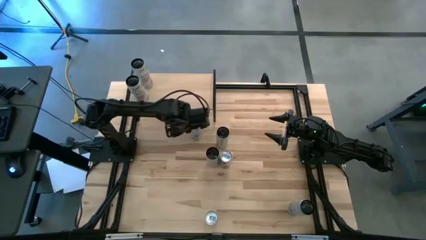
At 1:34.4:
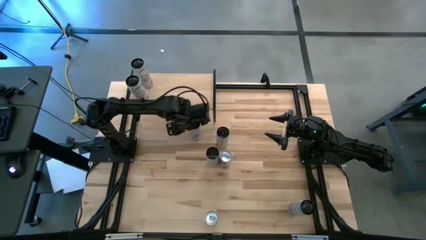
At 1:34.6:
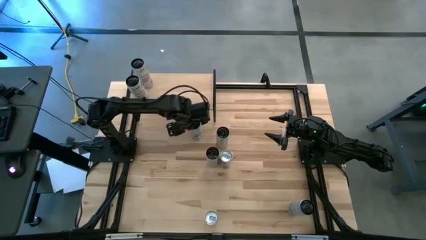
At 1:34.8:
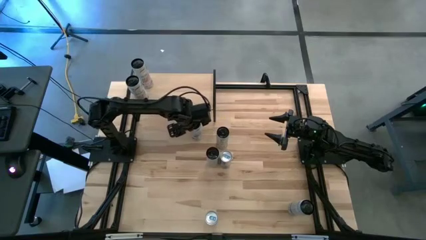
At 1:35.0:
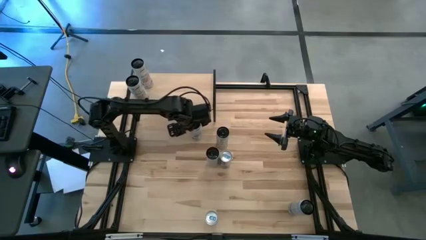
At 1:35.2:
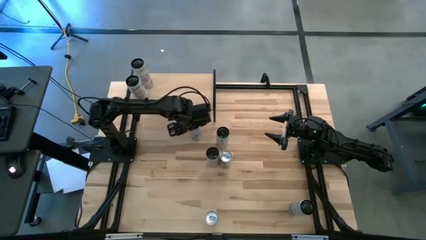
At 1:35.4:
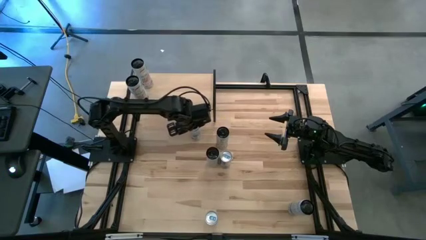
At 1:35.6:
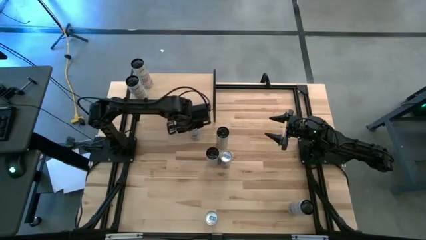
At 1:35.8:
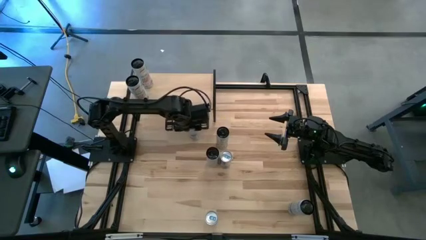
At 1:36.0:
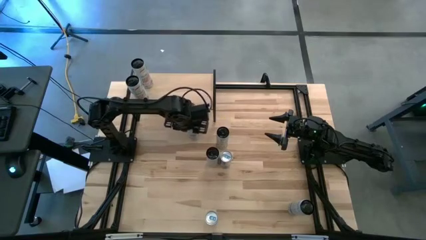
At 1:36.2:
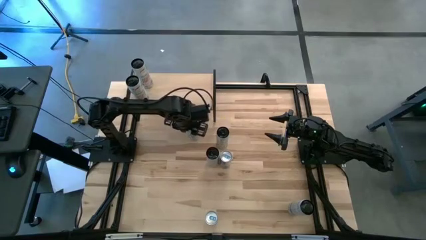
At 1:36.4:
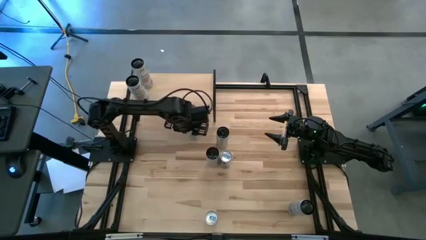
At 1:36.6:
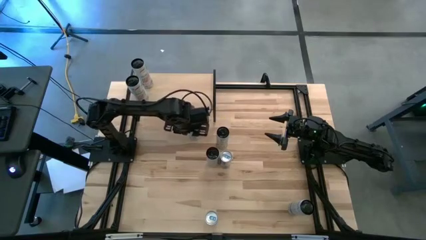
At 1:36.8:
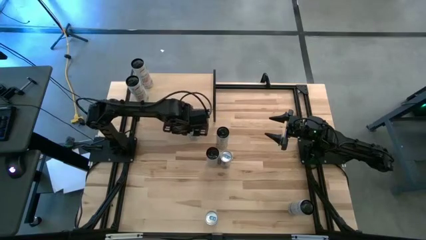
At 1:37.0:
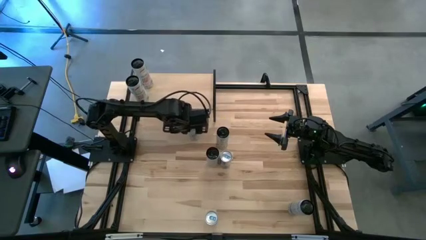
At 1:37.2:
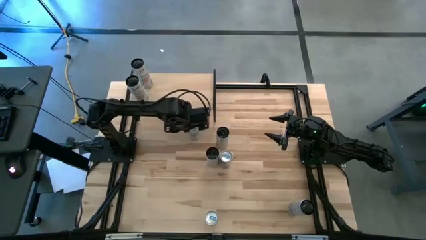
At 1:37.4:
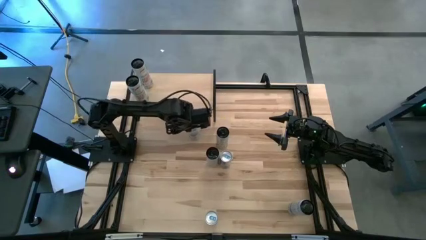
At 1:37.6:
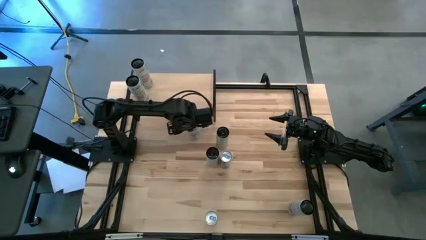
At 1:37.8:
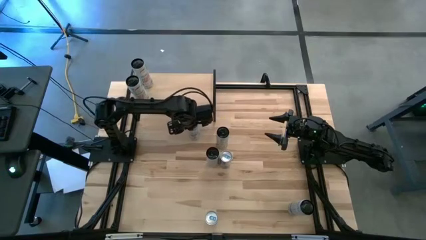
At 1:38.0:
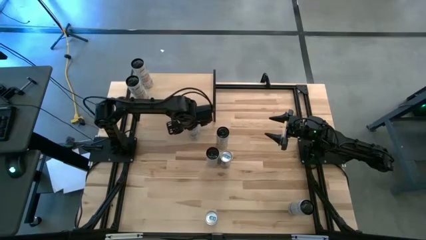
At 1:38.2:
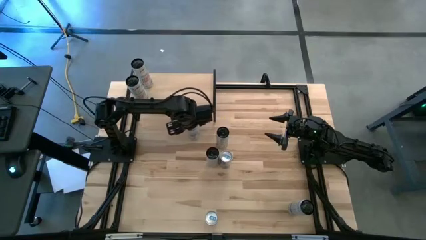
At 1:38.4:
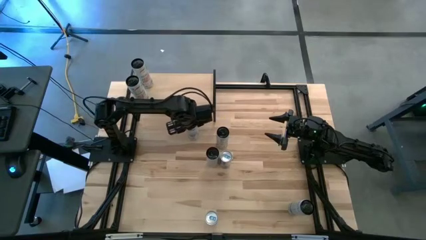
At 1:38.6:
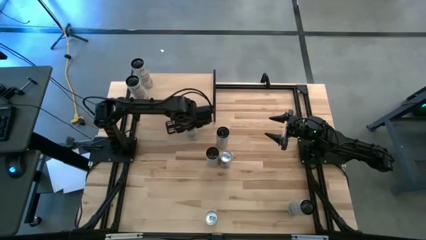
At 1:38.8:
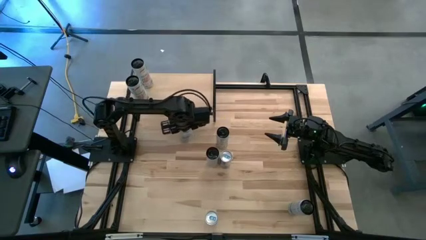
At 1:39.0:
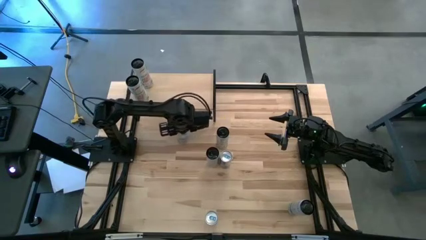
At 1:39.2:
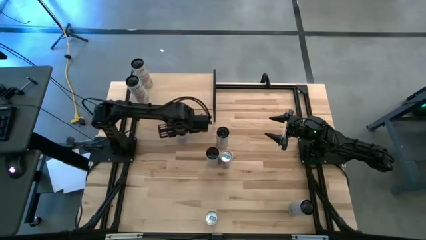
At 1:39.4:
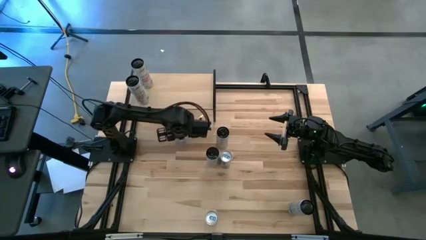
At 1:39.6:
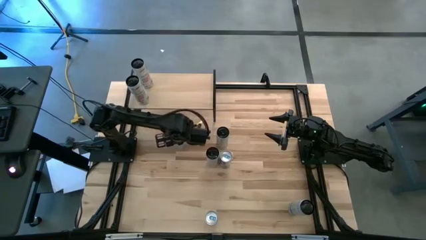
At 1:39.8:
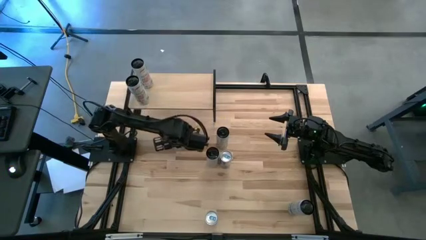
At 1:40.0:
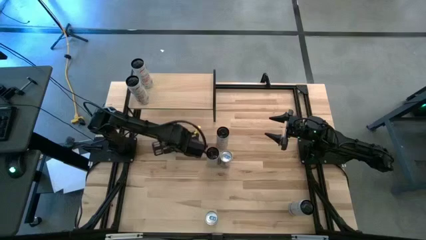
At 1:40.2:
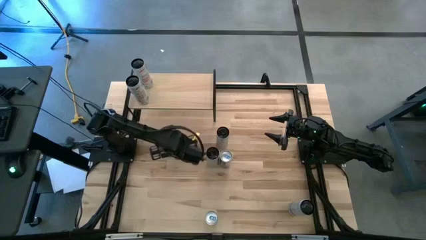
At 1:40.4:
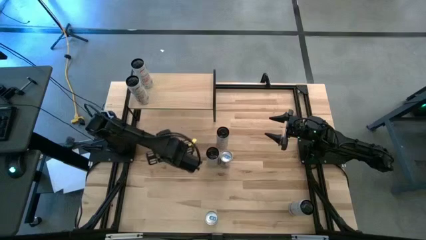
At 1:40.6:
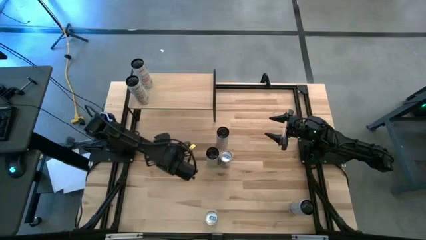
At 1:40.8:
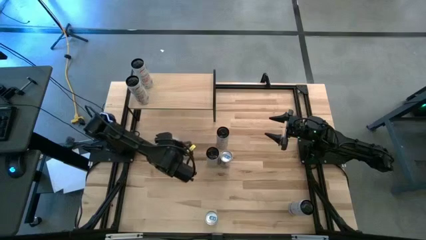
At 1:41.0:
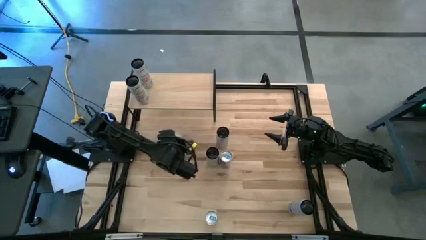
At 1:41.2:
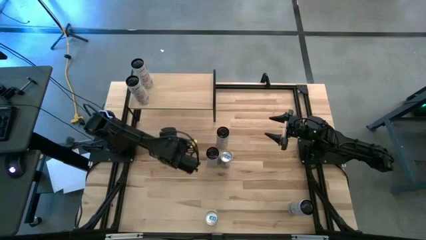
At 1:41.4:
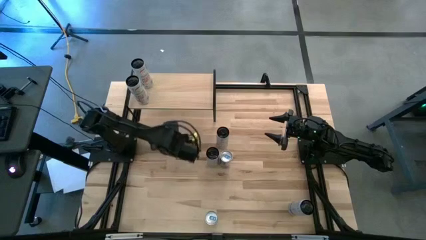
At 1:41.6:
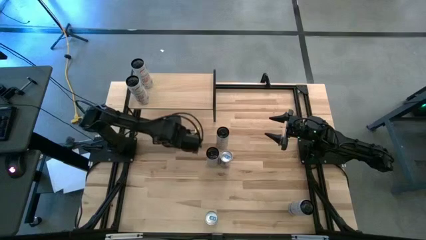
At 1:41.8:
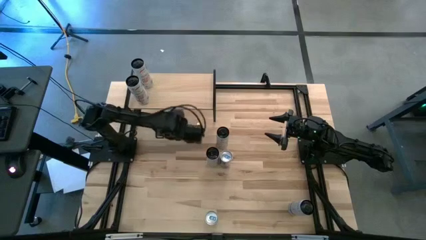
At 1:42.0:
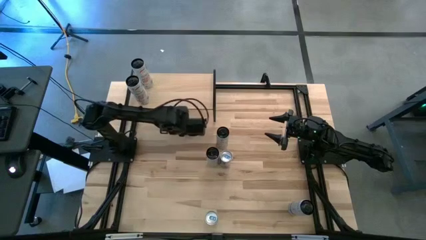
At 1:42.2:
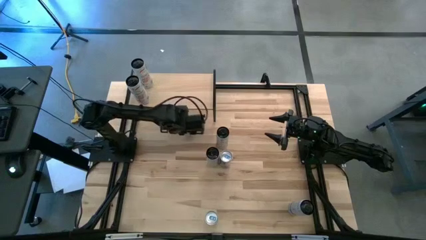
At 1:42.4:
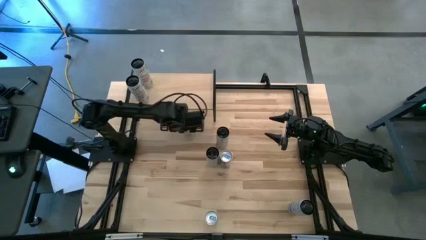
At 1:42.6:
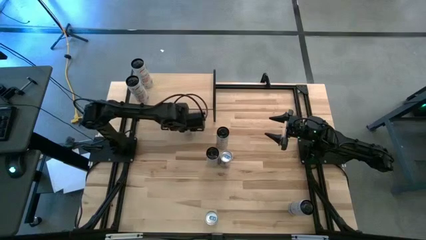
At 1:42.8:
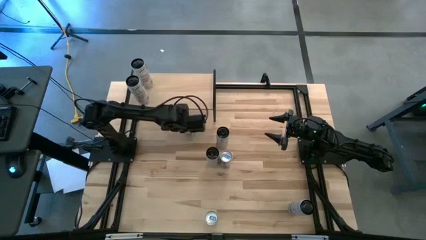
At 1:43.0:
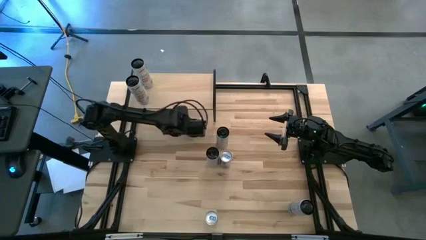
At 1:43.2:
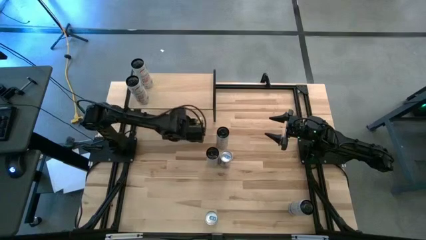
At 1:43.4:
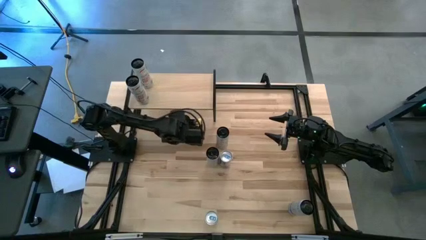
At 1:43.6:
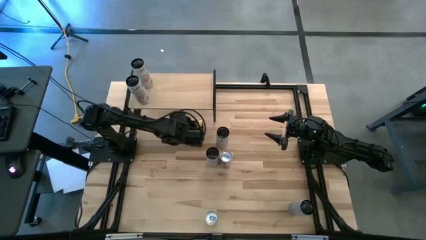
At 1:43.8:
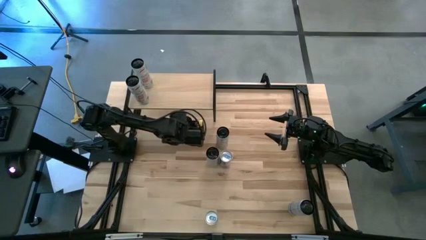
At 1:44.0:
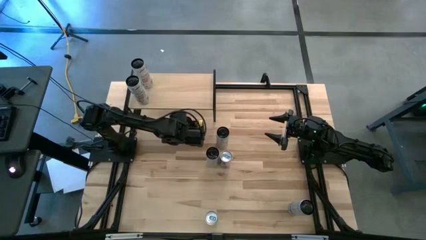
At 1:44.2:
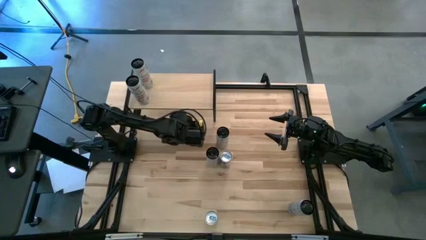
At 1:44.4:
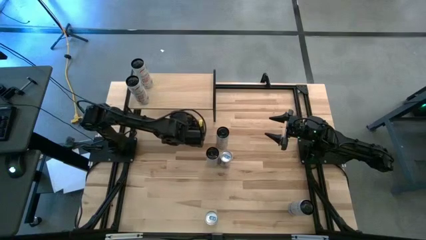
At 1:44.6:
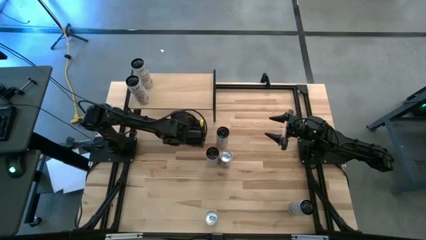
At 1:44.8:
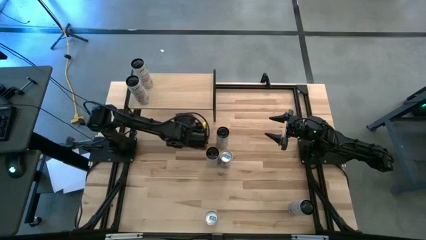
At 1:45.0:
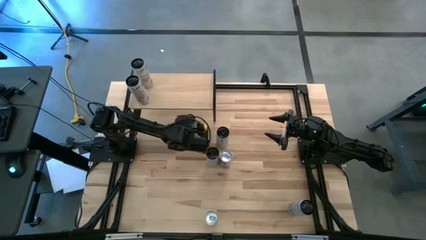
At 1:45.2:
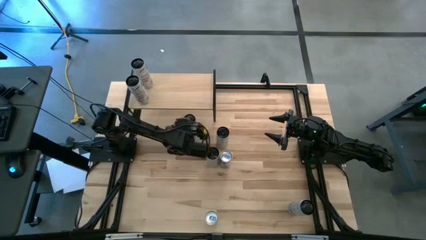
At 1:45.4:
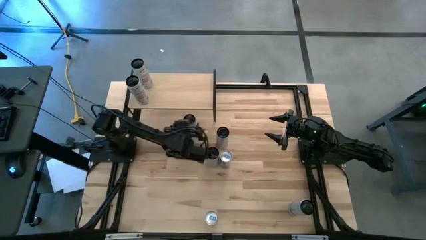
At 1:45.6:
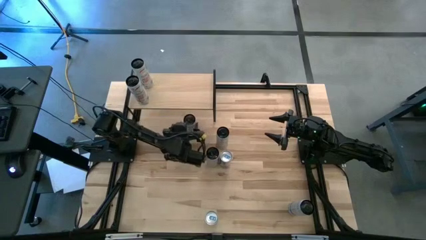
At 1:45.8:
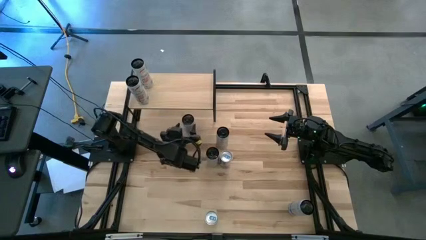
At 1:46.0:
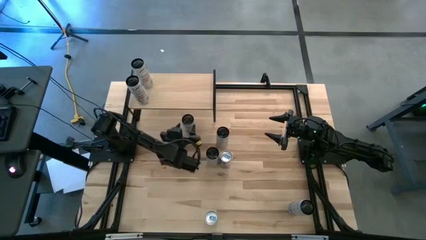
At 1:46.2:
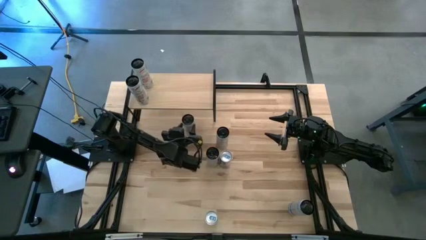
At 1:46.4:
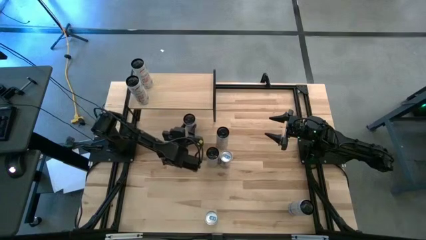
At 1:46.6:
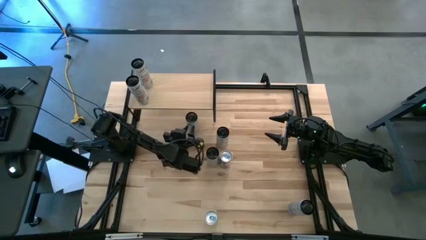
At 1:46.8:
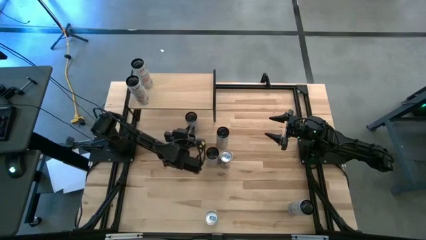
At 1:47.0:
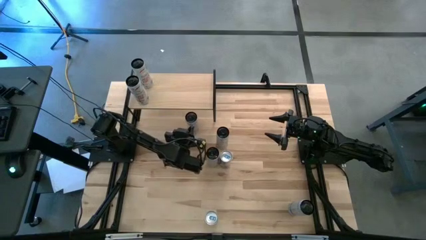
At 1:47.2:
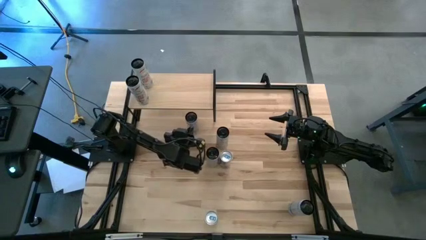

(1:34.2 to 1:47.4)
Task: Place canned beverage on shelf
Put the top white blue soda can on the shelf
